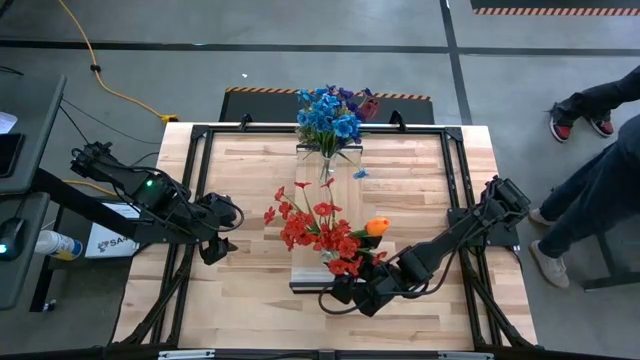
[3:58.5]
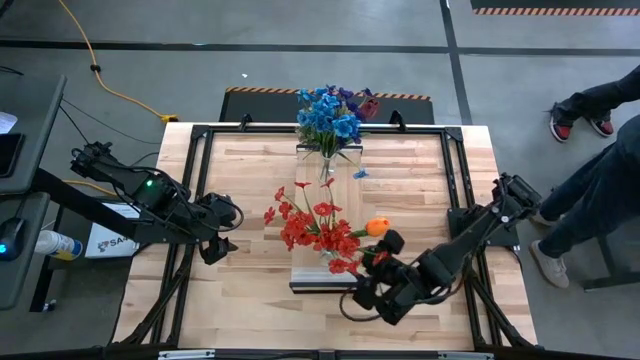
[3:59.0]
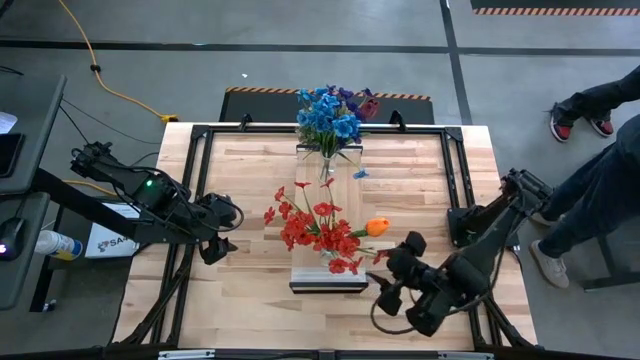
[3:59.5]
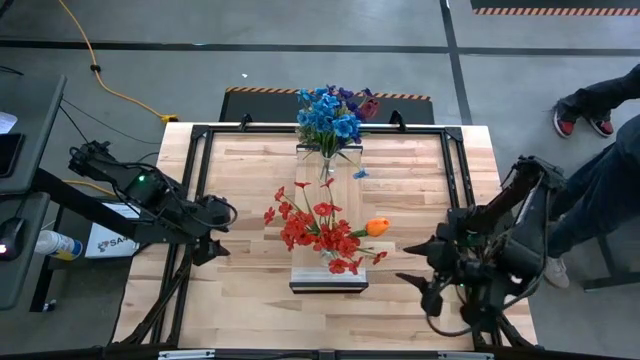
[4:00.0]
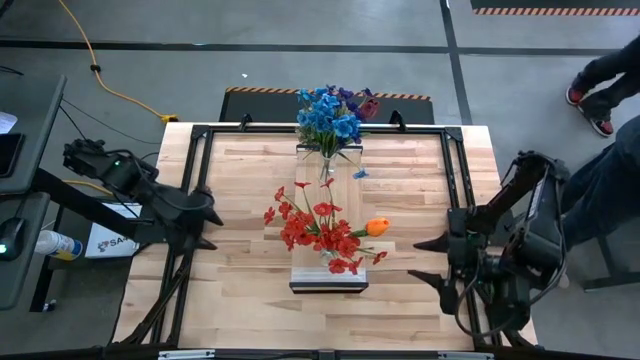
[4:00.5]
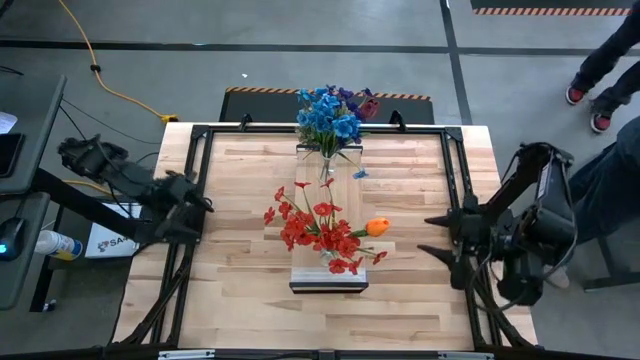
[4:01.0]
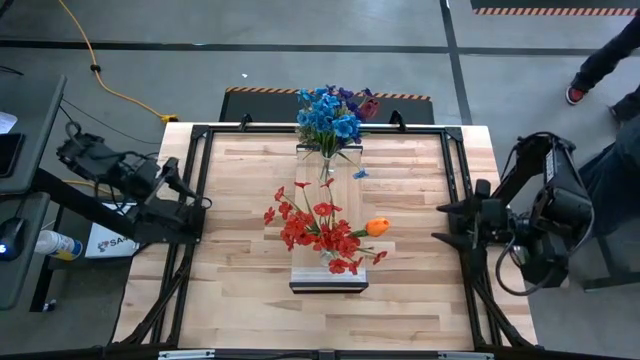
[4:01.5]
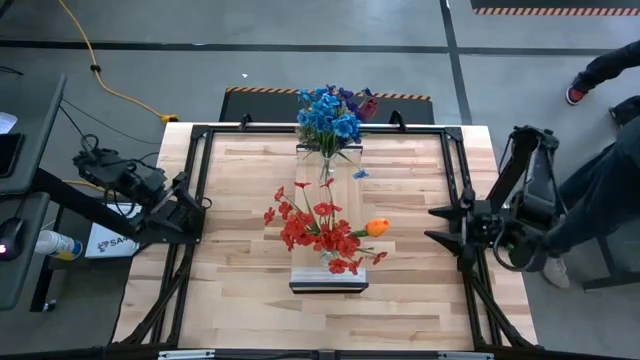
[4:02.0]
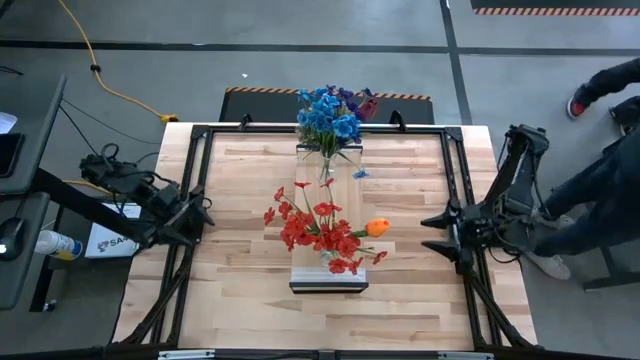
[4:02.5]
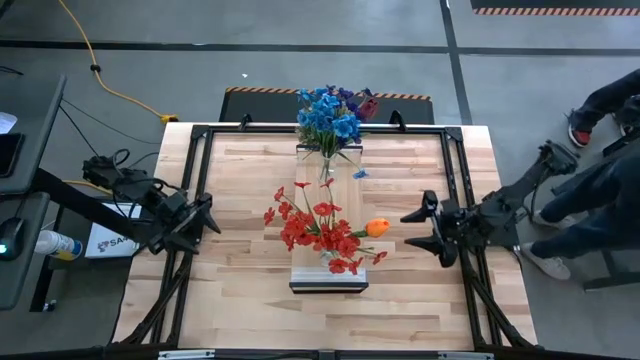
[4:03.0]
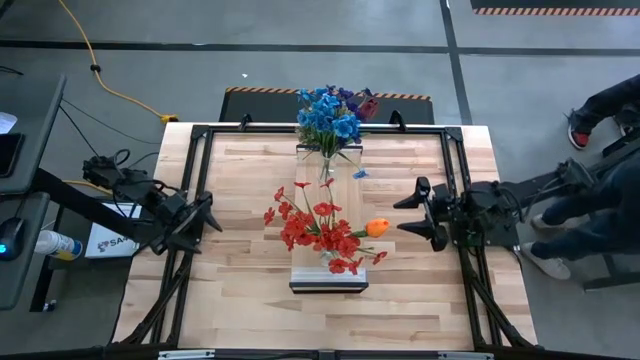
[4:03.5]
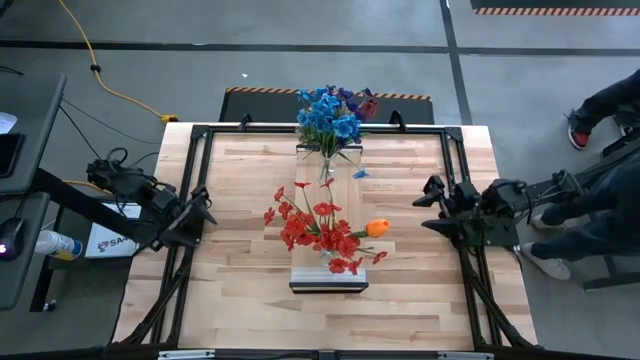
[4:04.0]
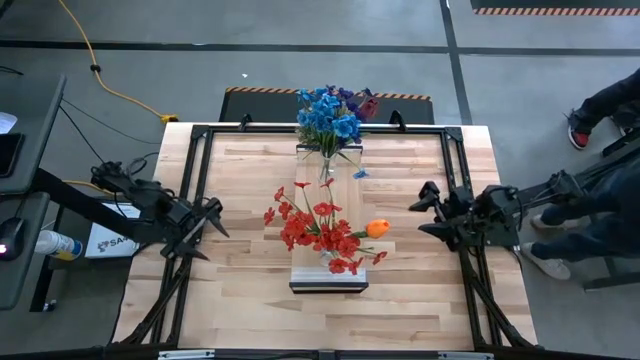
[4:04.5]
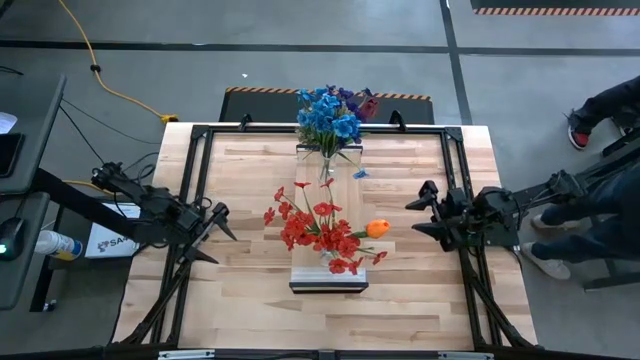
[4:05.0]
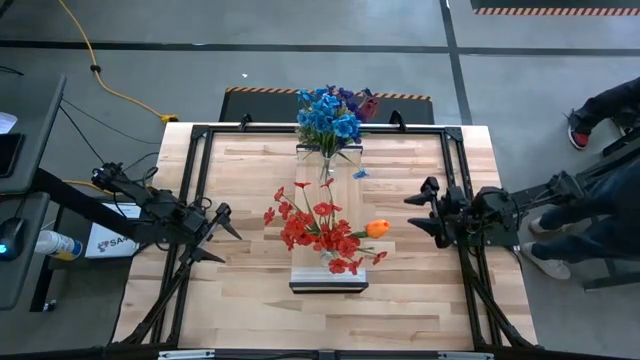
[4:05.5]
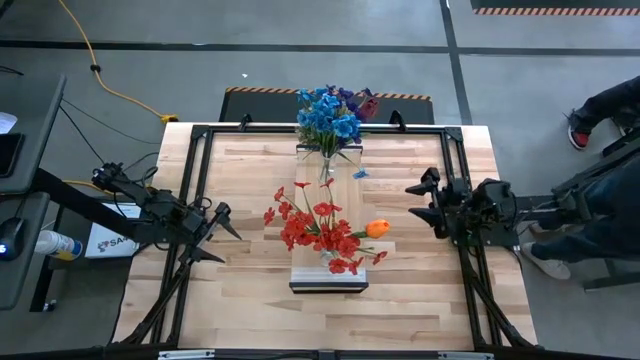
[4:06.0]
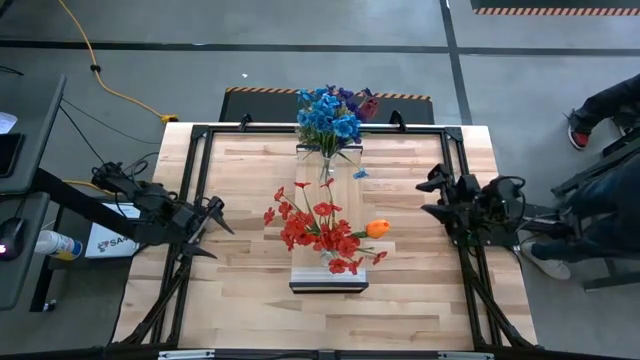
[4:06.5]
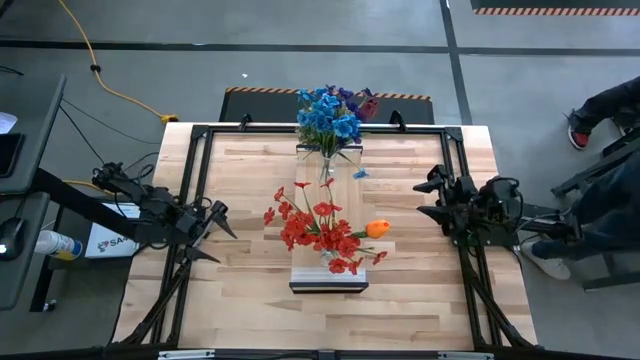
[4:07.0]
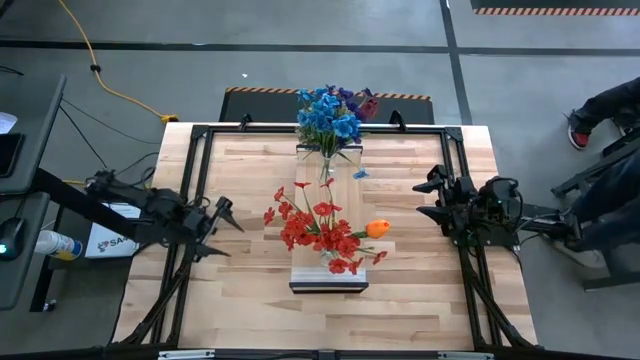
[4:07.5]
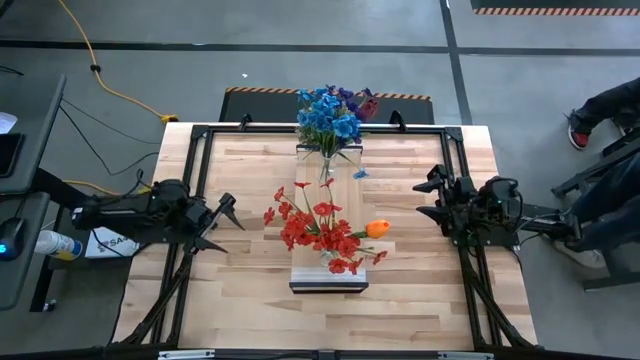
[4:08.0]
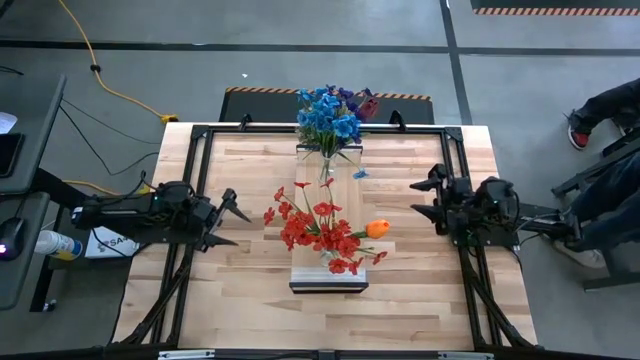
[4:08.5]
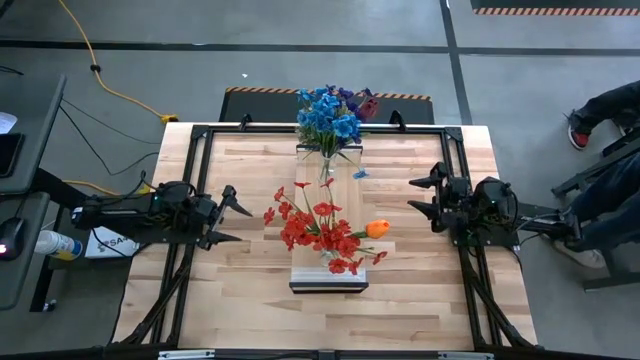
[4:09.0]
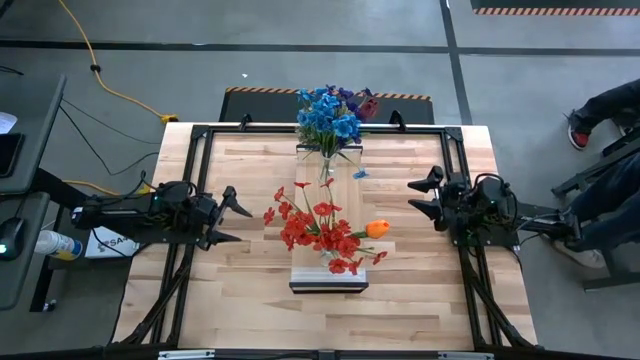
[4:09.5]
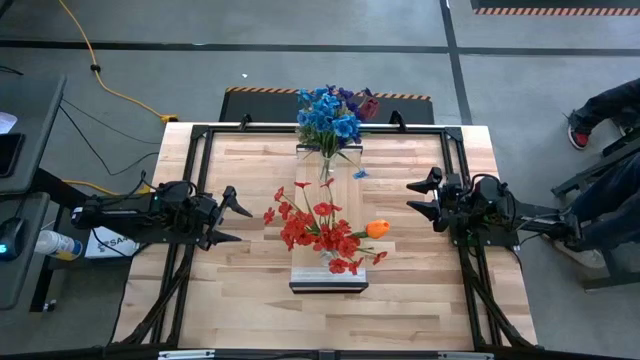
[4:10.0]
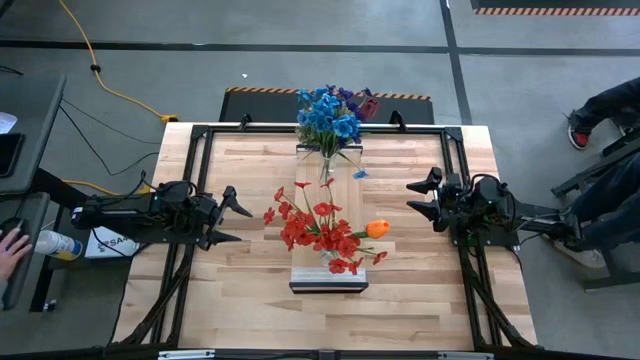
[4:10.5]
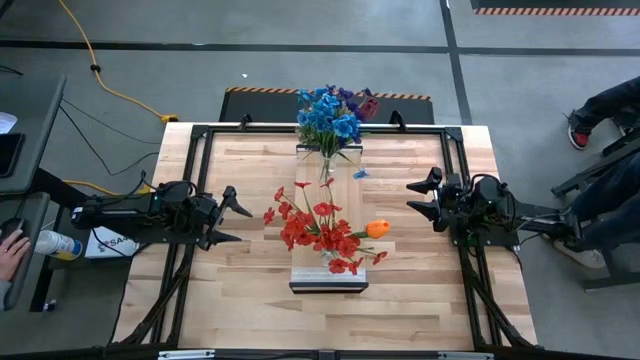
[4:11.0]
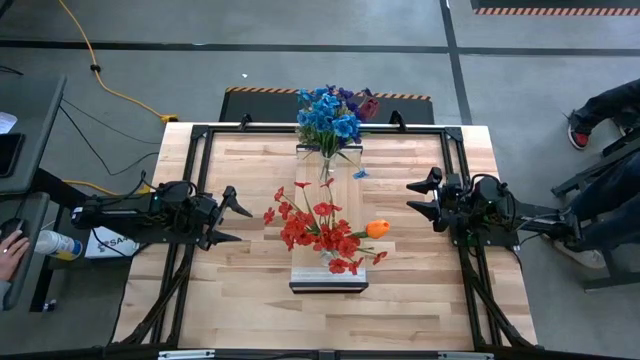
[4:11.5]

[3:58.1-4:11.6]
Task: Pick and place flowers into a vace then onto a shelf
Return to Home Position

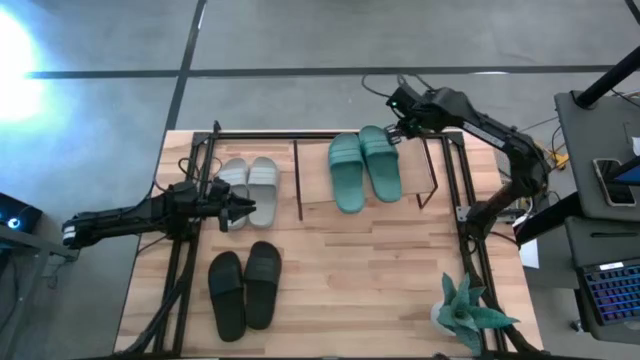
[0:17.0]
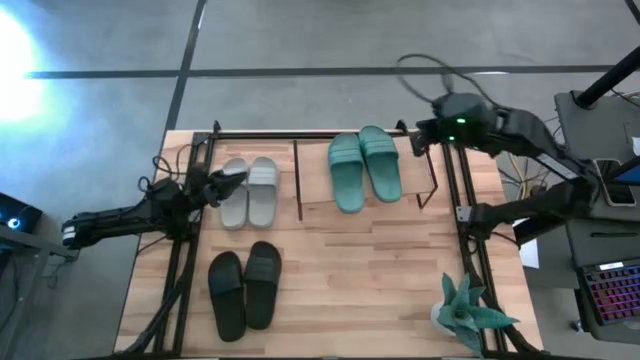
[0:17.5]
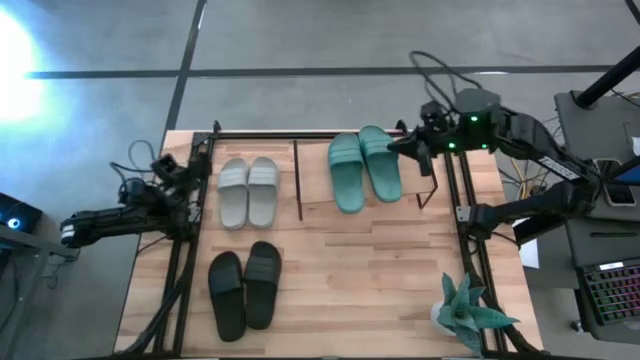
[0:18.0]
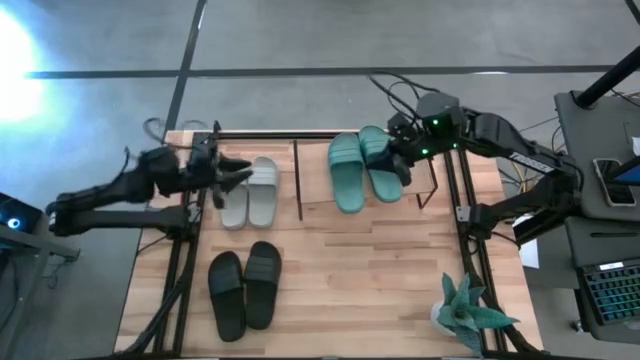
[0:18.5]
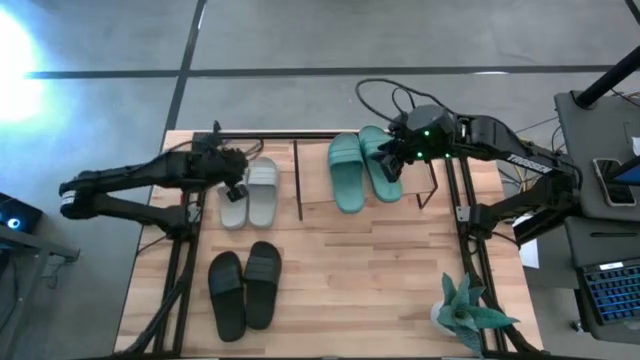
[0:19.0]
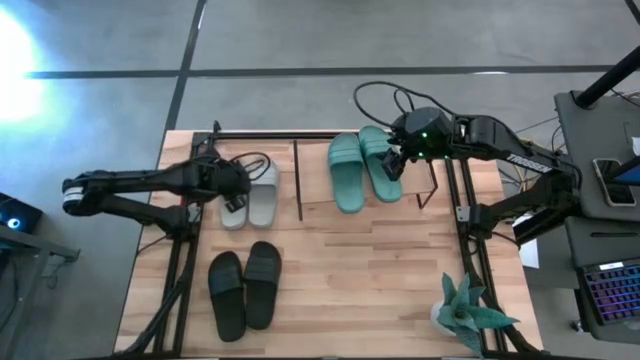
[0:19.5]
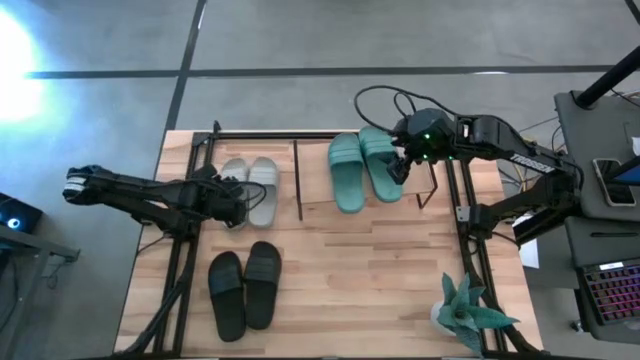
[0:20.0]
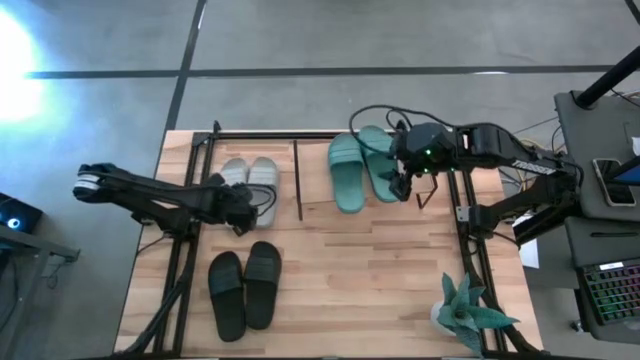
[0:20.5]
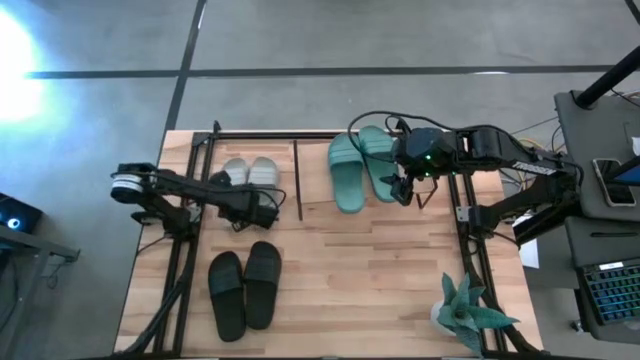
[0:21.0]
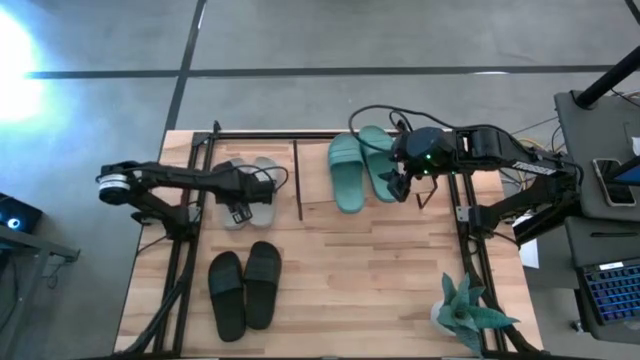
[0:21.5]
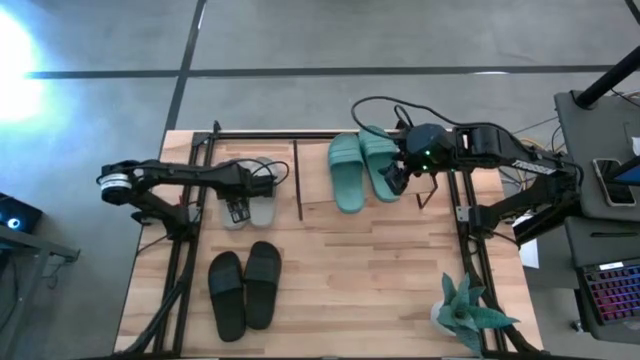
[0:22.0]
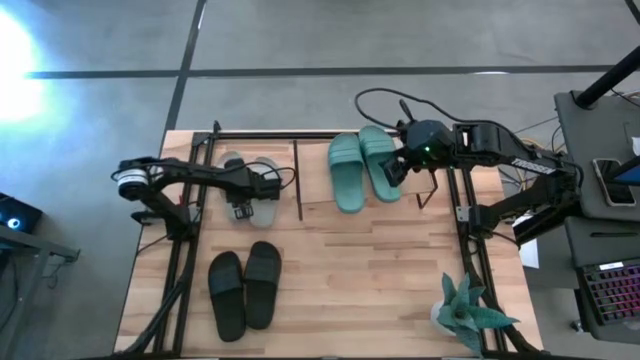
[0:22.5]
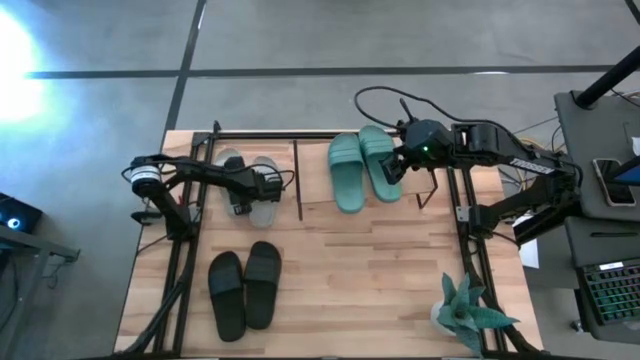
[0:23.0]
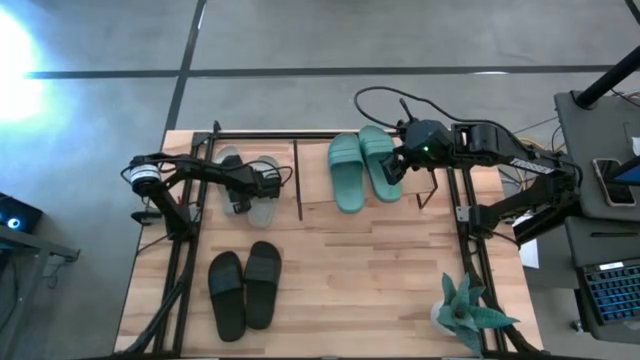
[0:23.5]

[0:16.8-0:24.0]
Task: Pick and place slides into the shelf
Put the left gray slide under the shelf
